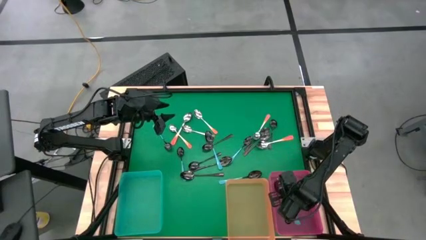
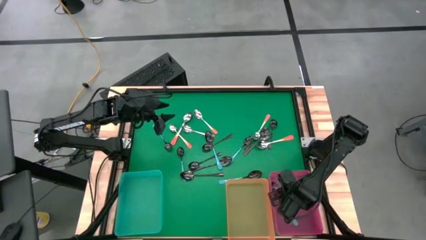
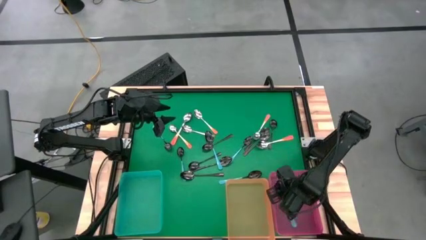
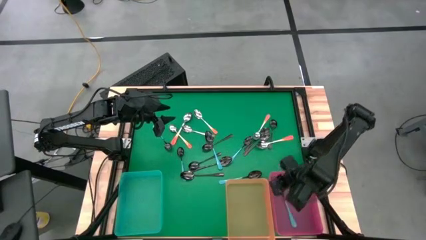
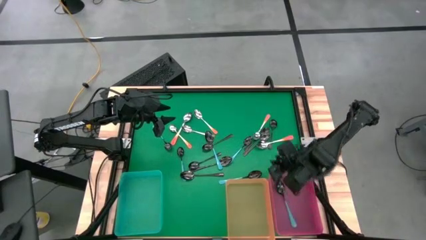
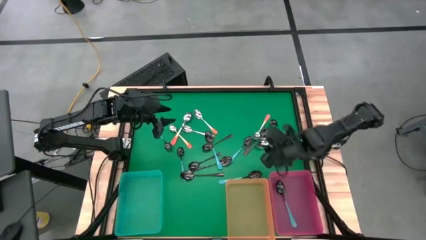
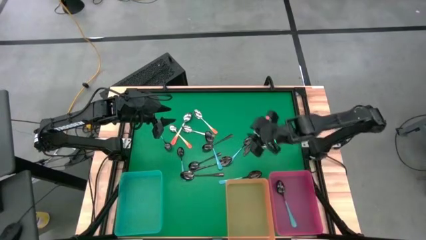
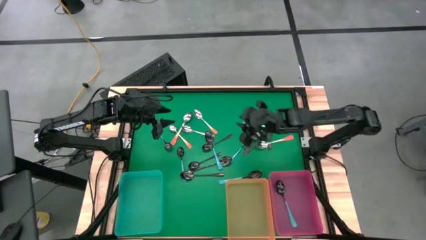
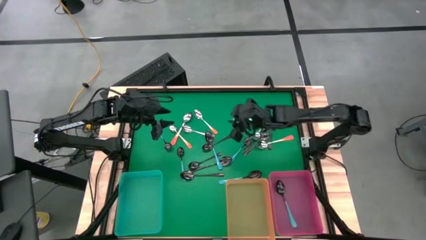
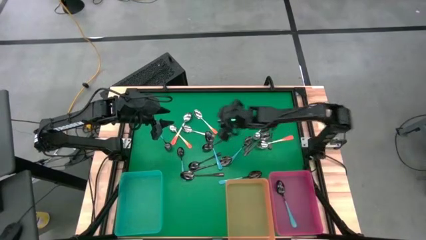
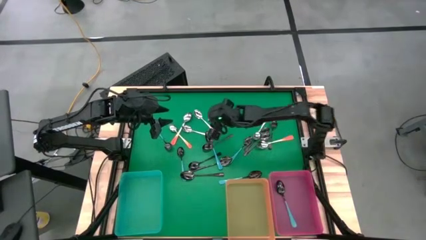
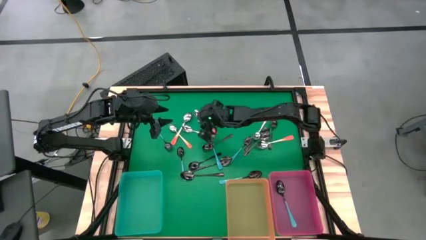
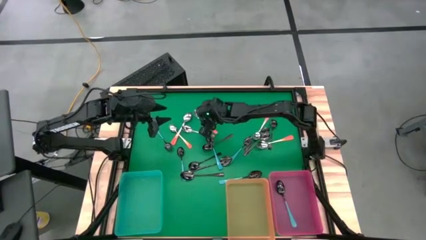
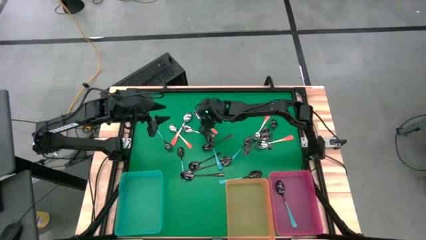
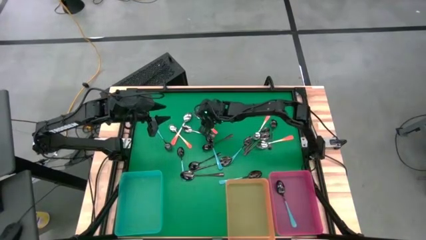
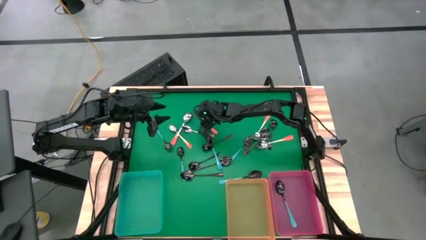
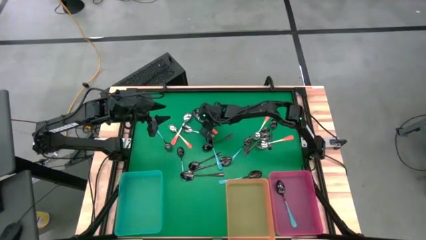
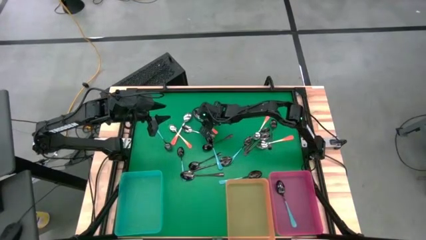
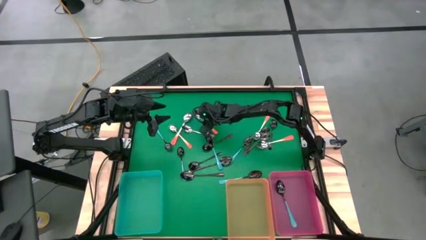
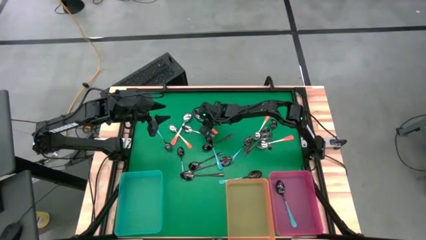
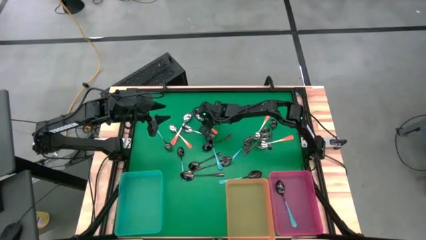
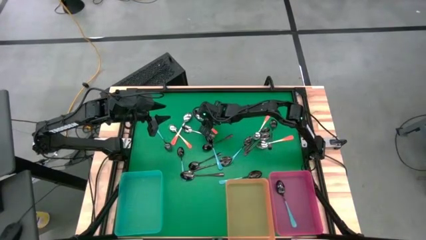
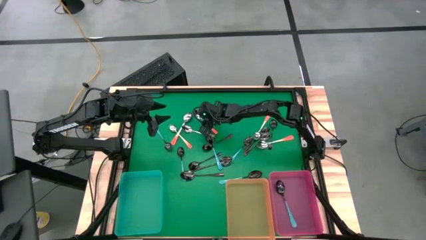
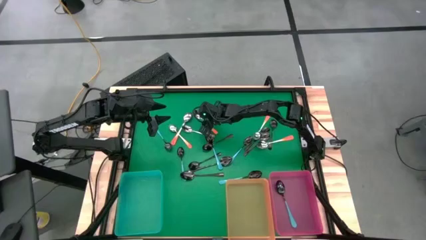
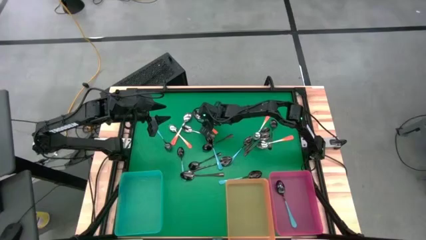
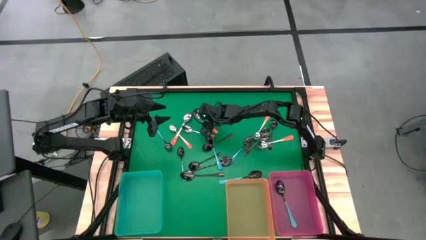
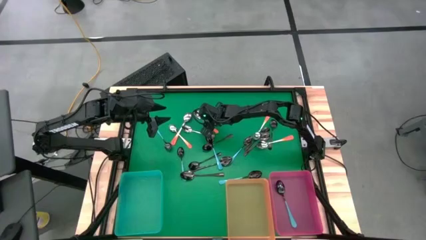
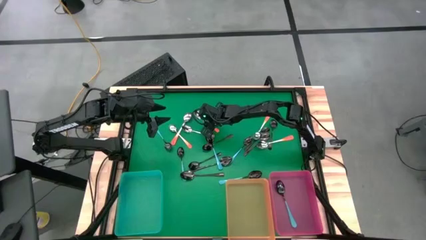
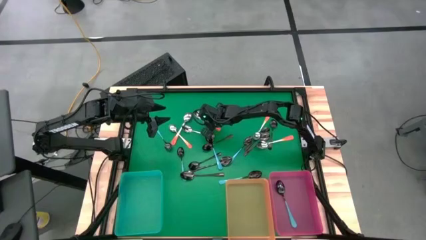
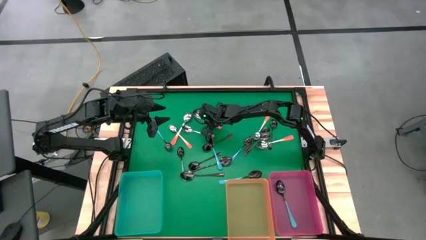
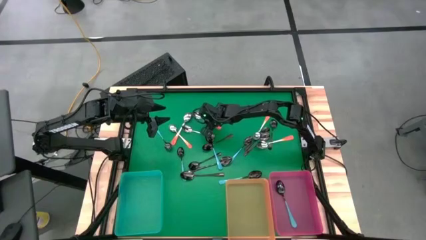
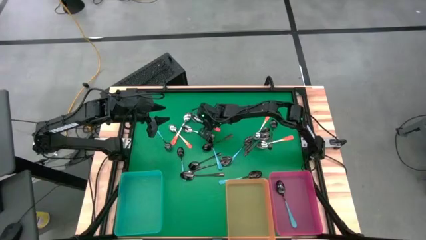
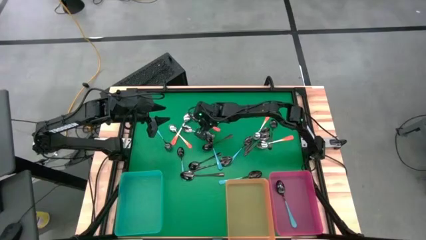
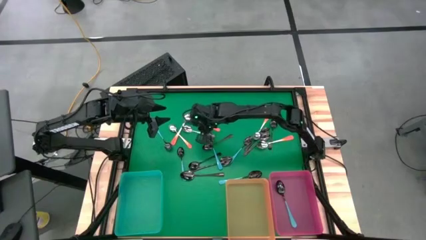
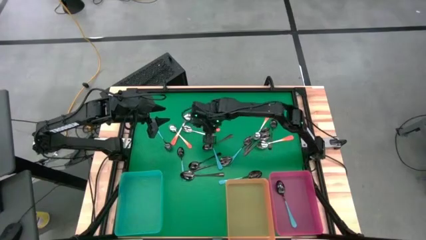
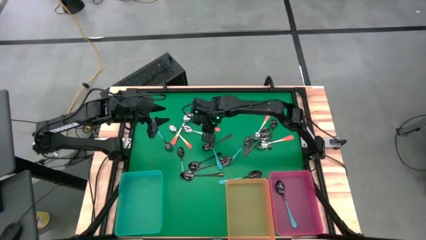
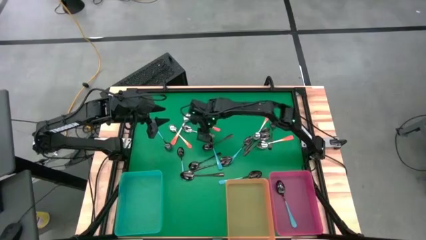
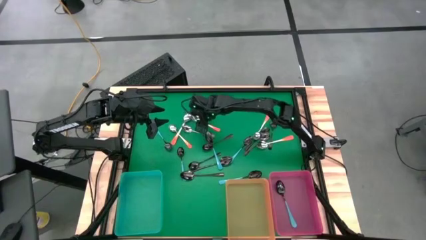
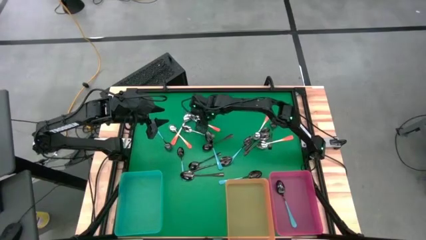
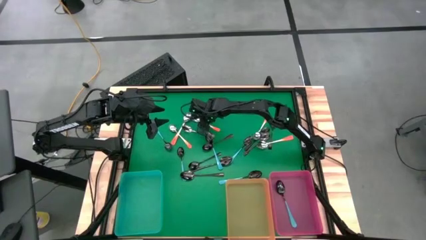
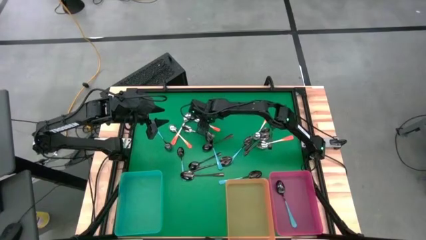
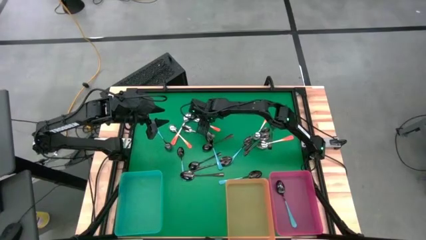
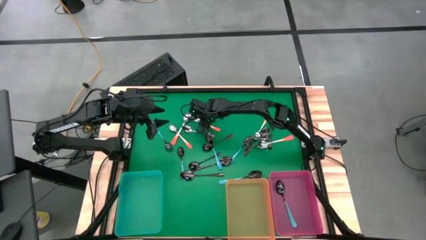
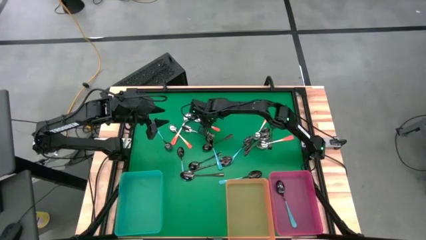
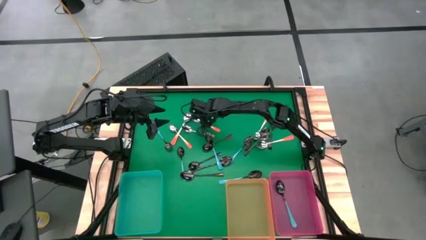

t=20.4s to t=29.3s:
Task: Sort silverware by color (type)
Put the orange spoon into the green bin

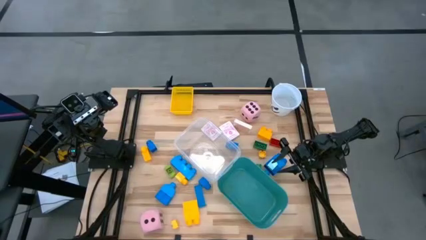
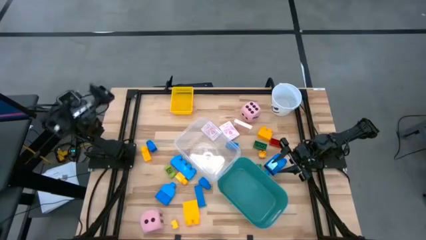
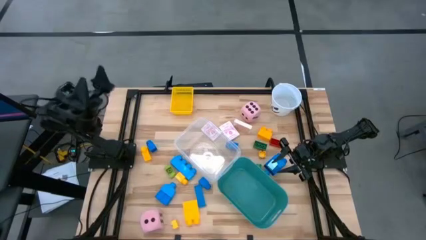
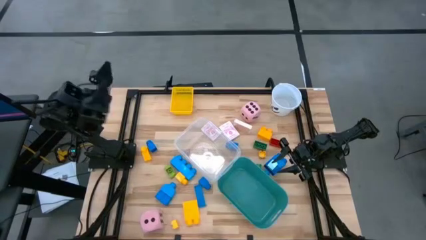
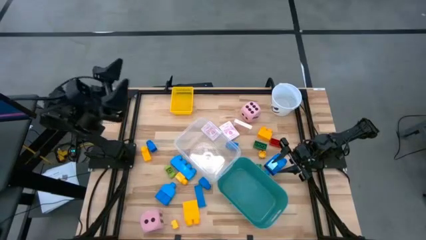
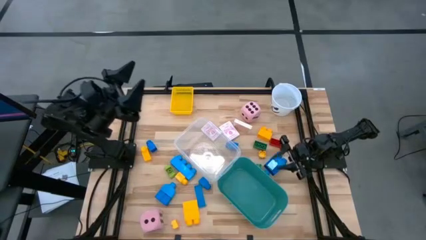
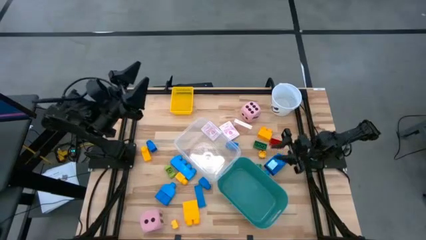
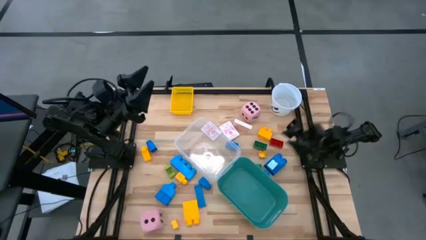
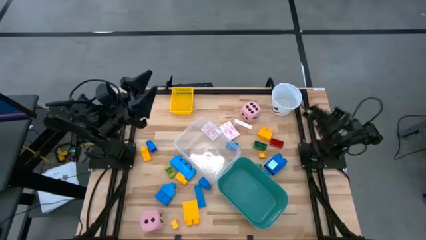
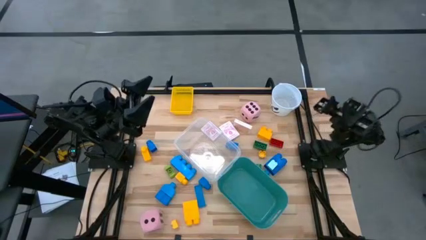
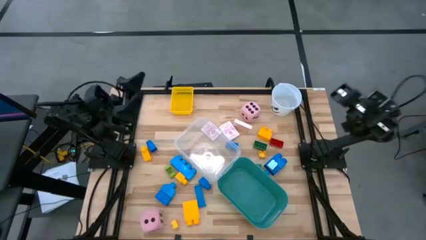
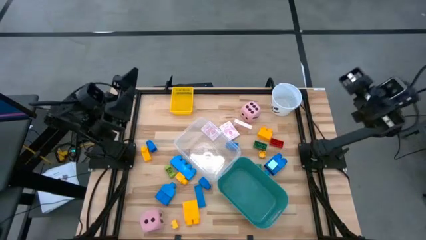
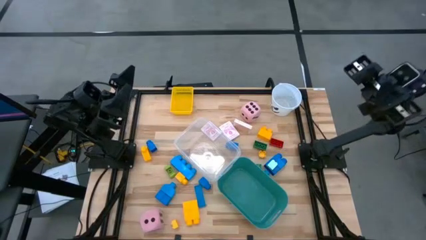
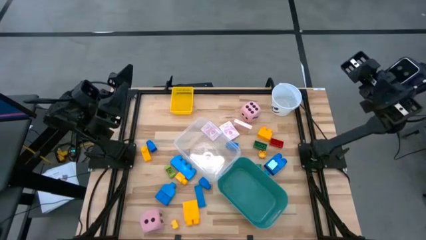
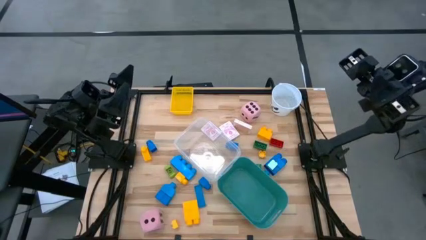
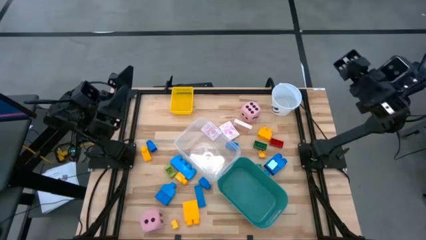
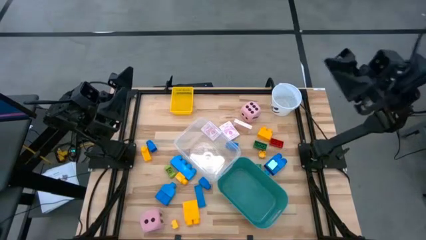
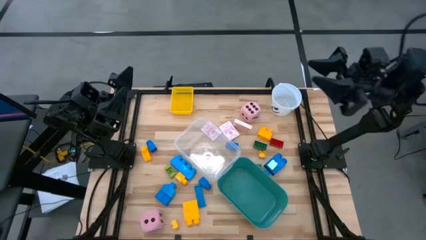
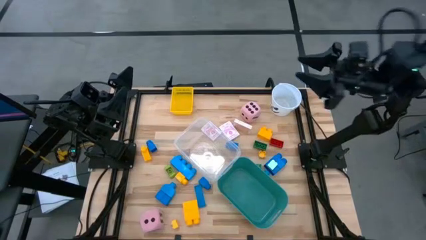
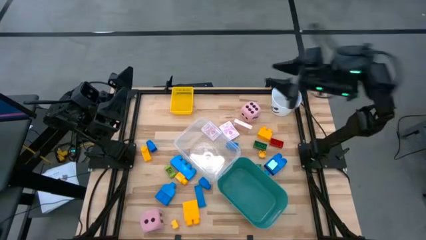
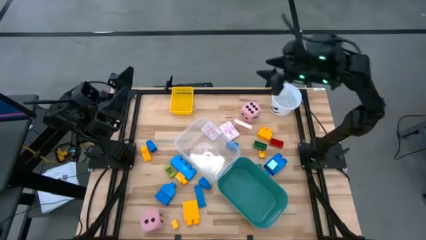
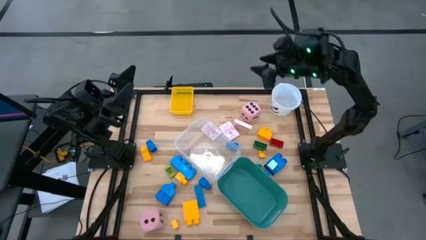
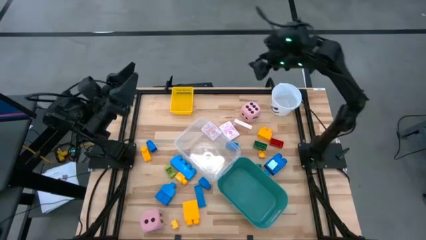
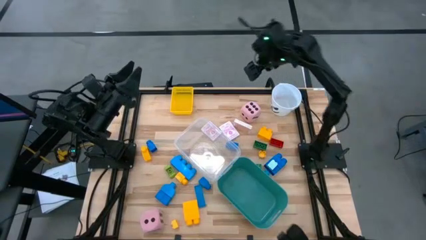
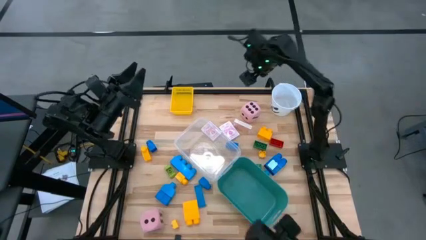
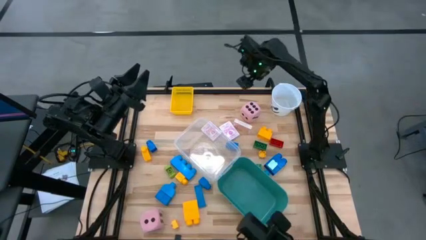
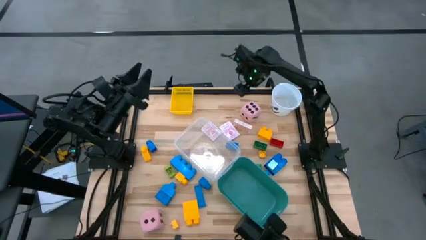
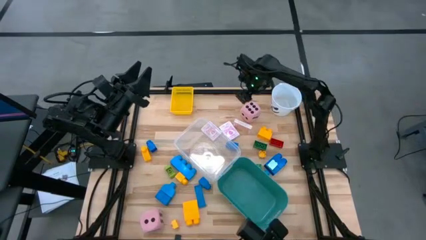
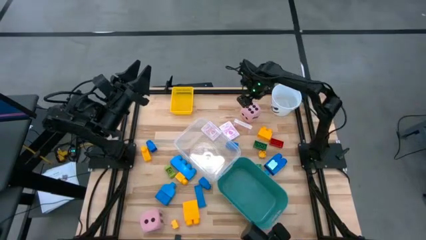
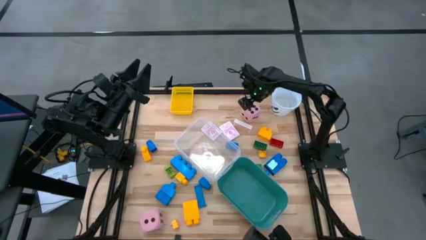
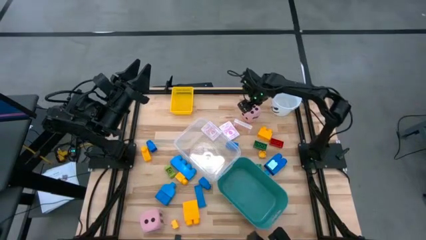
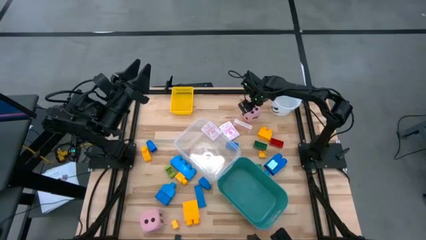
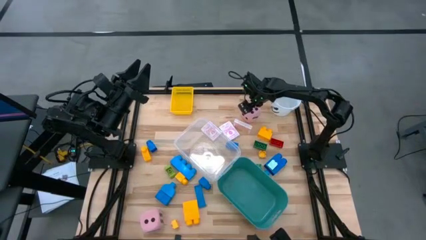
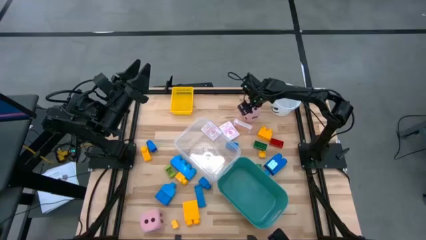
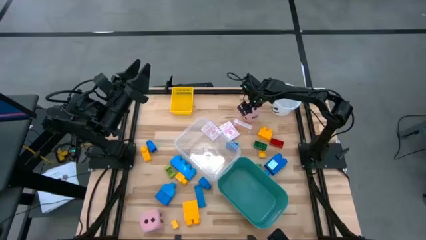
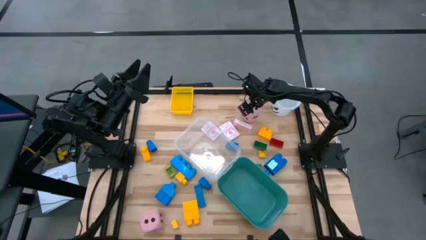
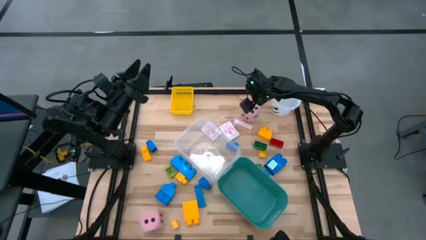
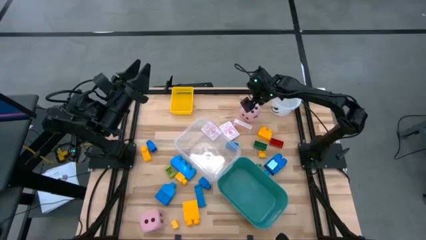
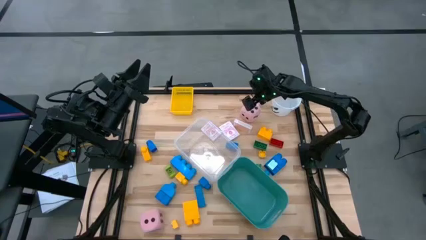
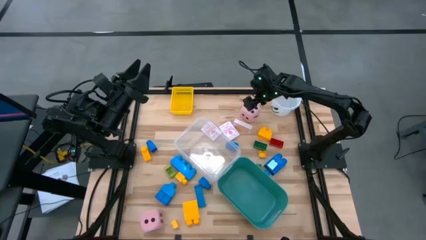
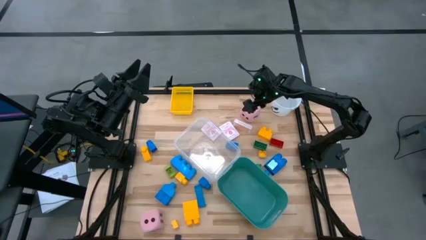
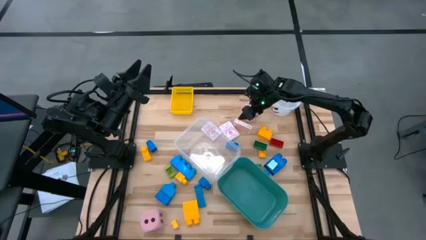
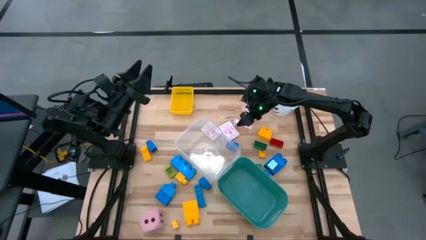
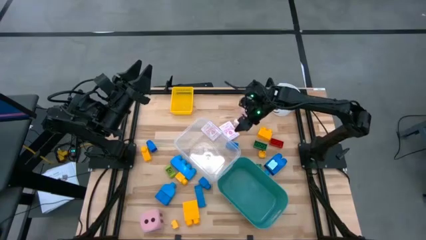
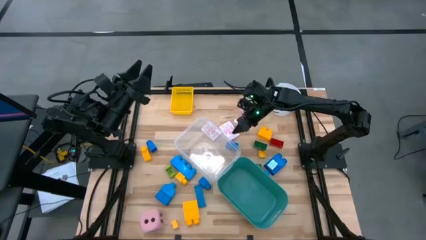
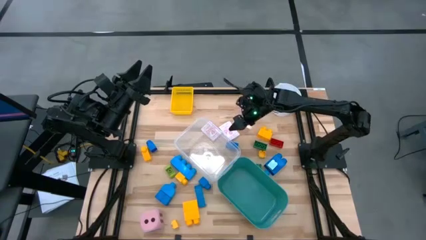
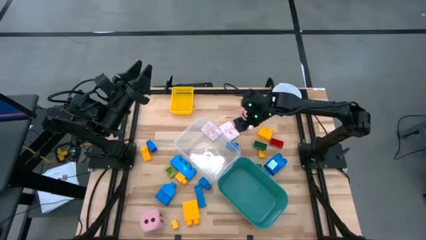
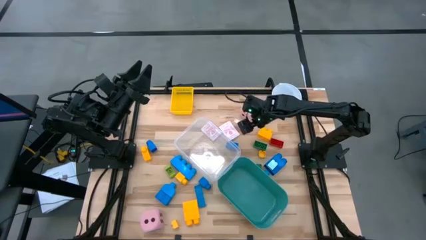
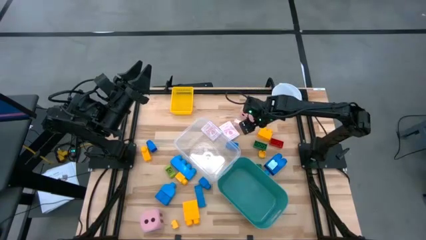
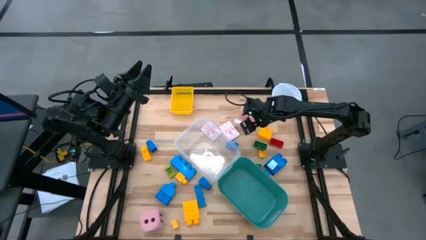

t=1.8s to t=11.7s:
Task: Pick & Place Toys
Put the pink die into the green bin
